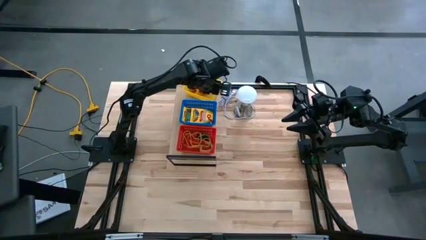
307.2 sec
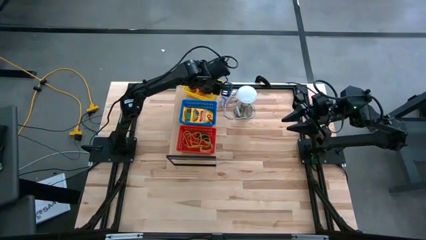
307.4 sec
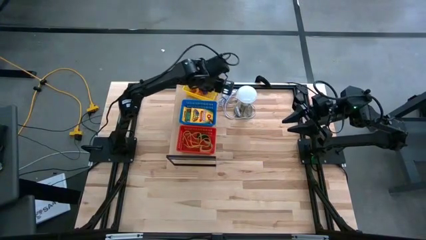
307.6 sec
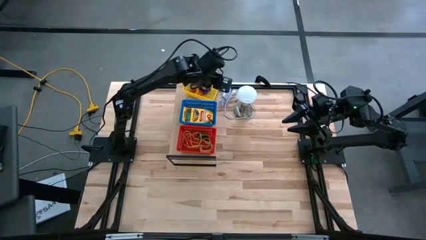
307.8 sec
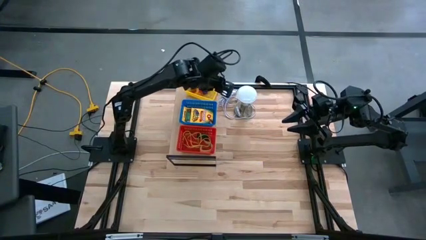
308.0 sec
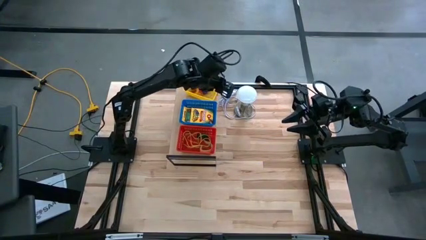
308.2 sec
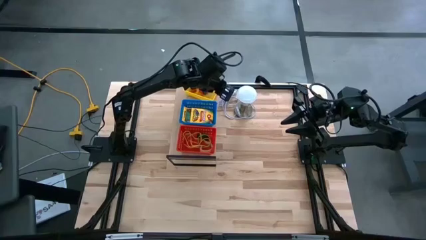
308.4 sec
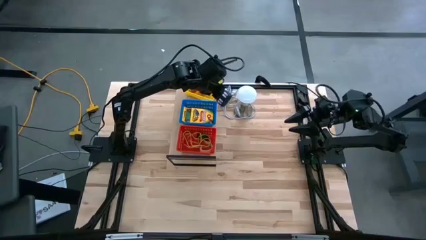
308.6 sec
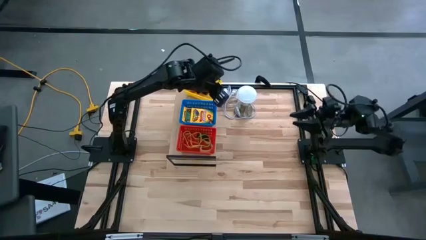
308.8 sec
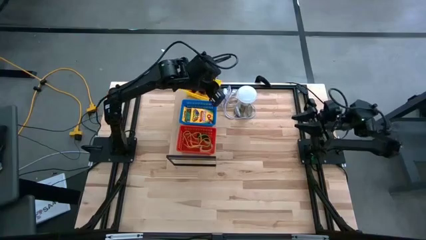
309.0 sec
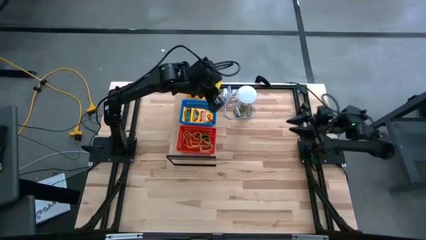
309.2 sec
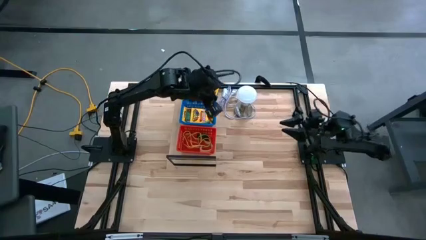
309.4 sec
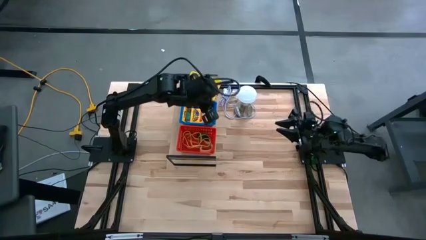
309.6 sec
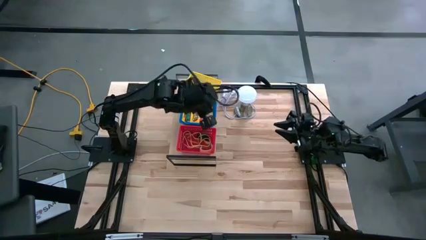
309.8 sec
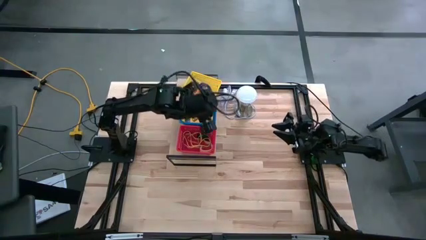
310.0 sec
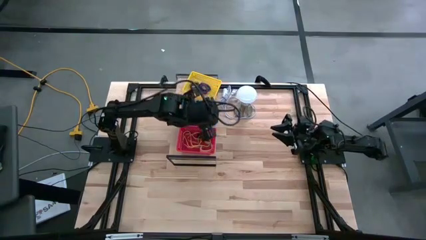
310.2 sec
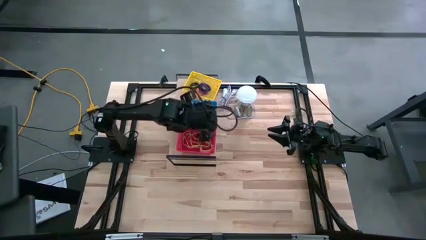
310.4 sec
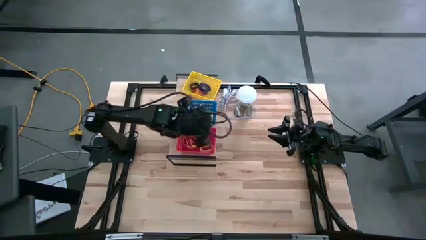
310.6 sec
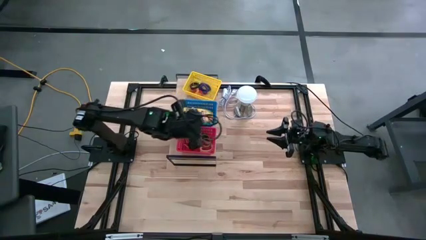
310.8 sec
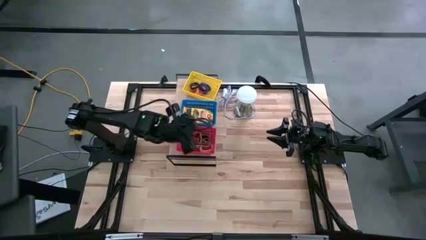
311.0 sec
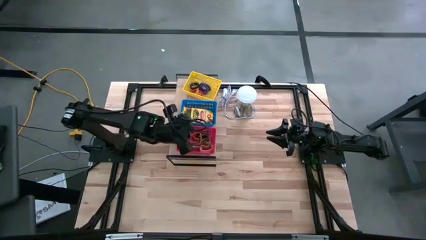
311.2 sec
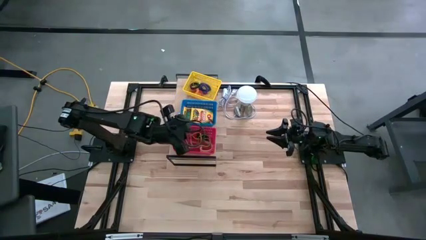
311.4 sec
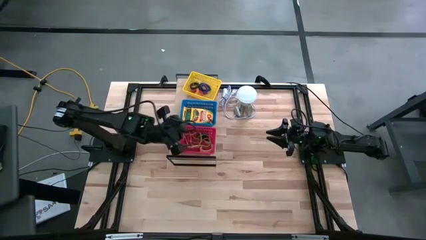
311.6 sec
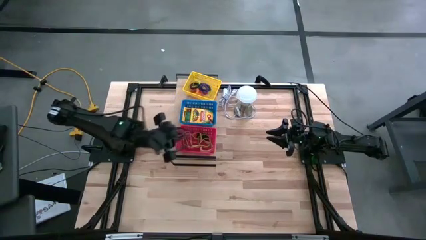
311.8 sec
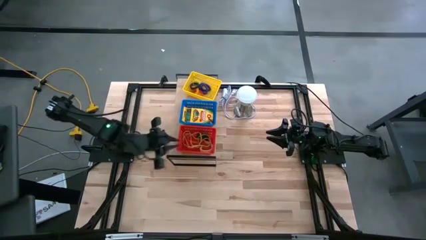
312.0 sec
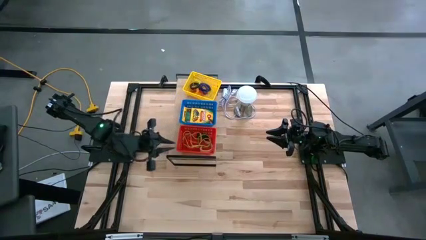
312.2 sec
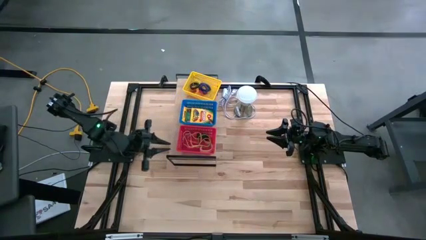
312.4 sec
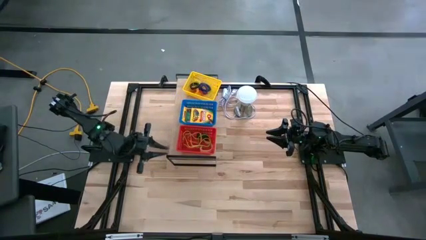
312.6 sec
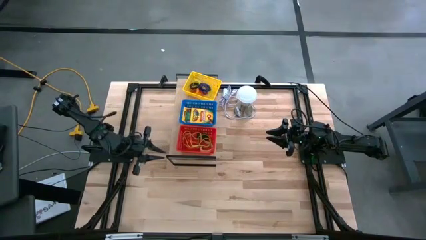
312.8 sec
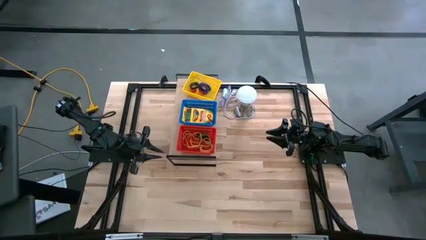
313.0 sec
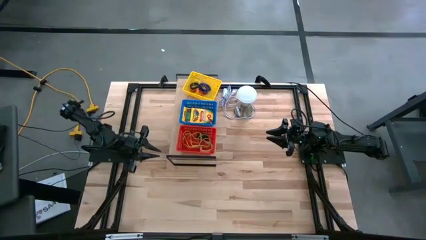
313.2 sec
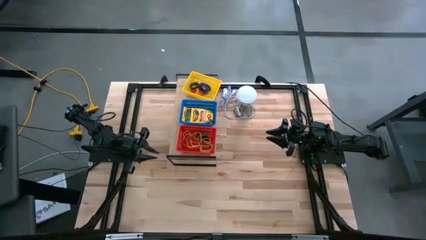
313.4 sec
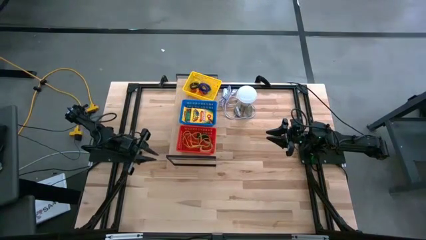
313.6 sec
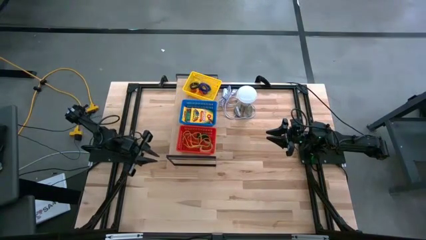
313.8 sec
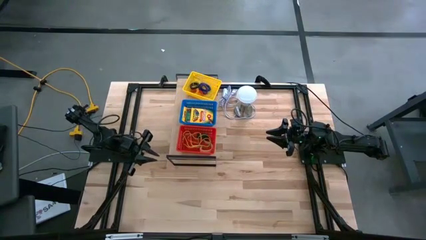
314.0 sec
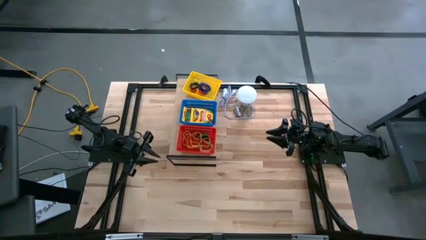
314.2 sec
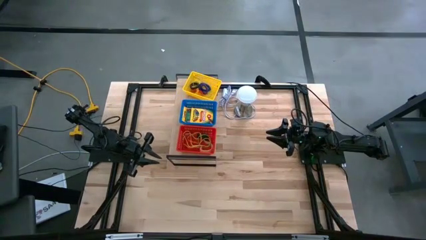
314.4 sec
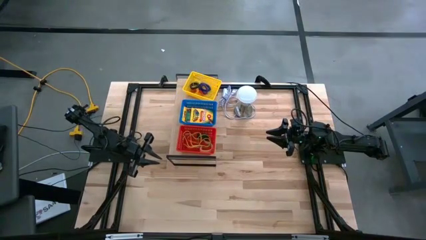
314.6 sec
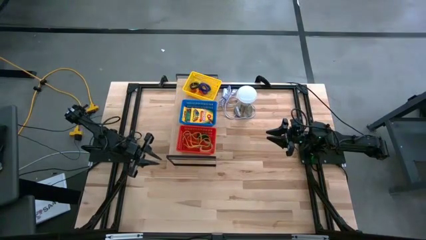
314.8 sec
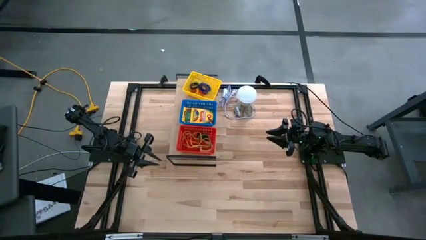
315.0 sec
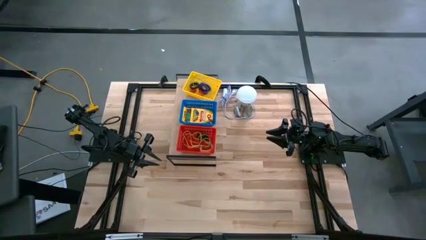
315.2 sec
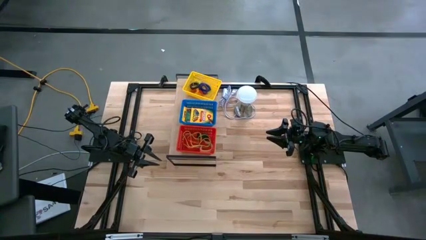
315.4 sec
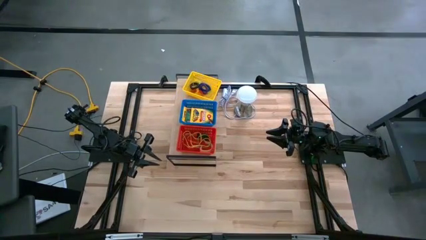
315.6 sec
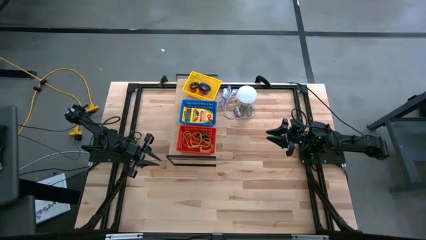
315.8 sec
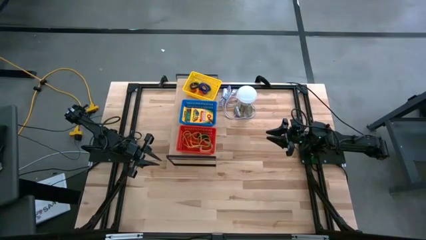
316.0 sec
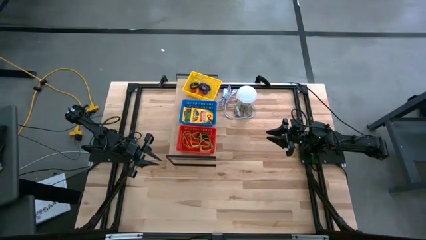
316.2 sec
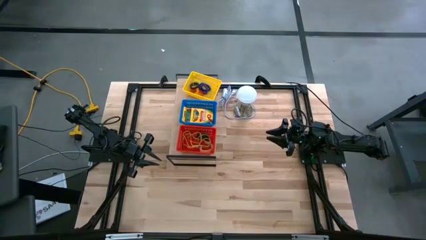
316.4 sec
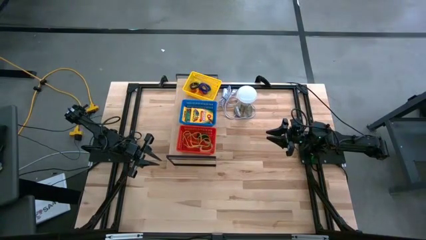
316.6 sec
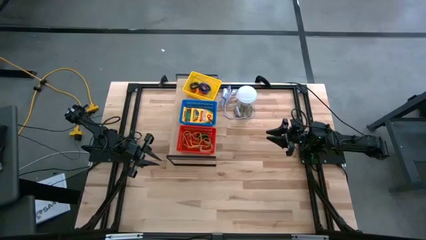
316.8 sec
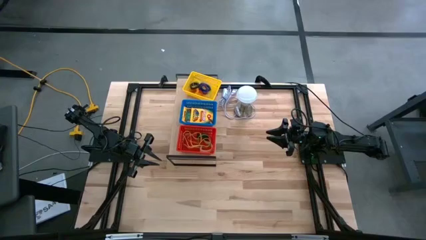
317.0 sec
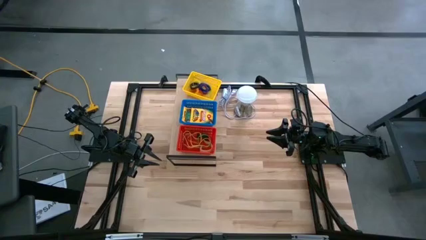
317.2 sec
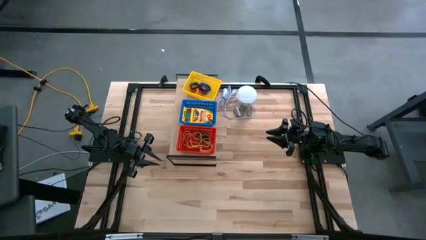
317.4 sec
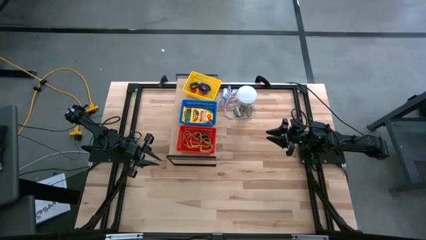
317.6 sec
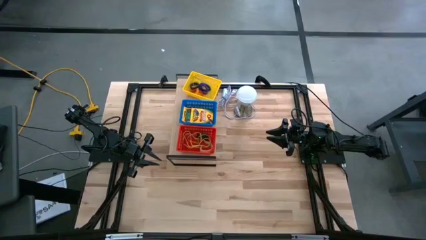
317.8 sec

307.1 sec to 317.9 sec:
Task: Pick & Place Office Desk Supplies
Return to Home Position

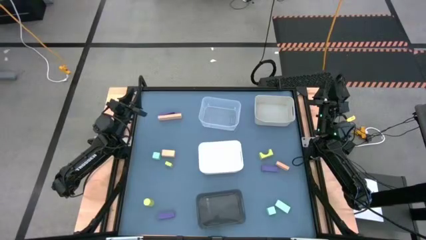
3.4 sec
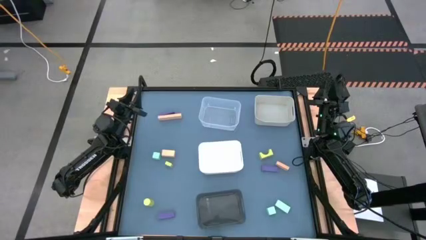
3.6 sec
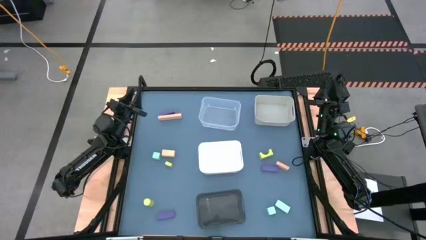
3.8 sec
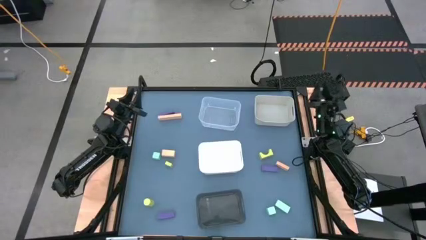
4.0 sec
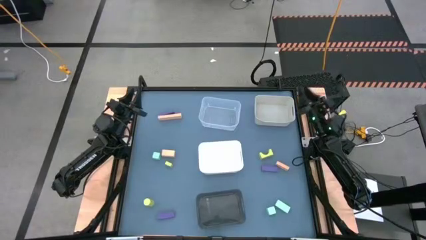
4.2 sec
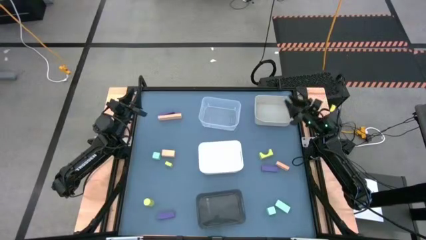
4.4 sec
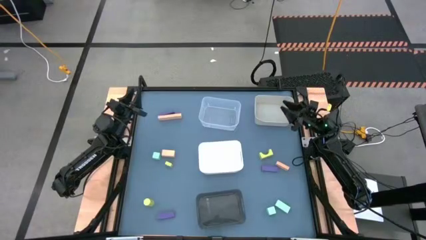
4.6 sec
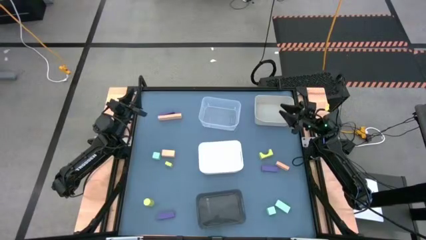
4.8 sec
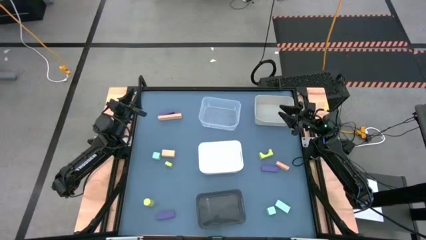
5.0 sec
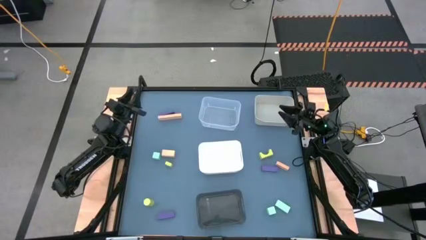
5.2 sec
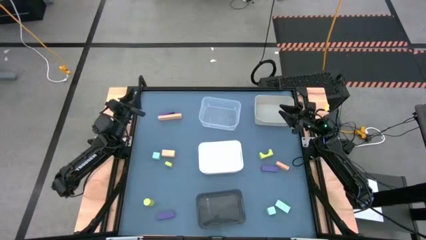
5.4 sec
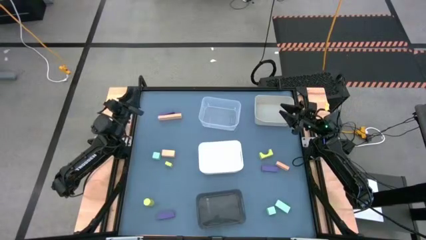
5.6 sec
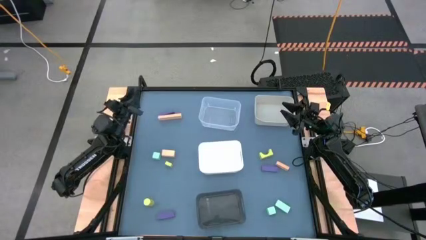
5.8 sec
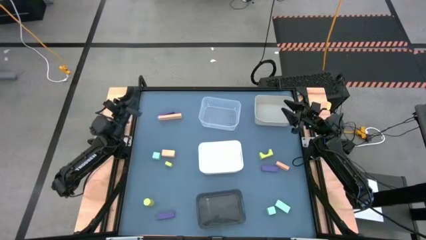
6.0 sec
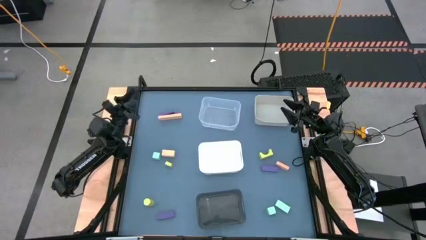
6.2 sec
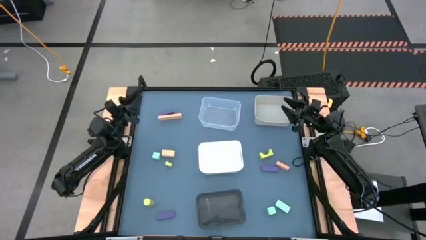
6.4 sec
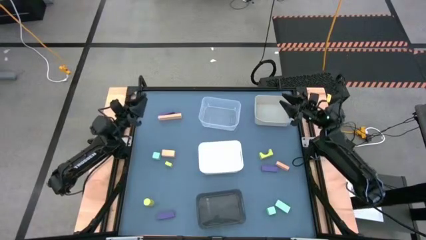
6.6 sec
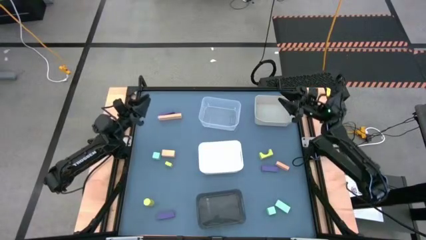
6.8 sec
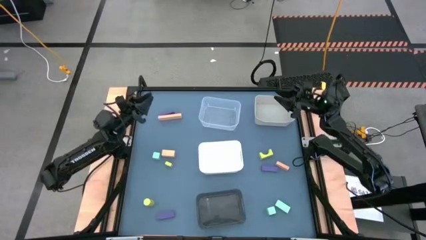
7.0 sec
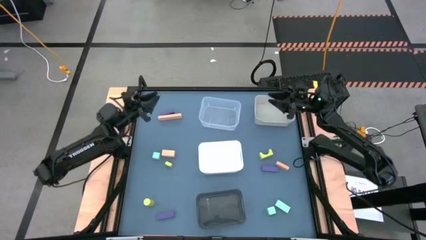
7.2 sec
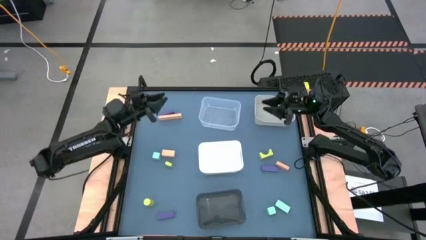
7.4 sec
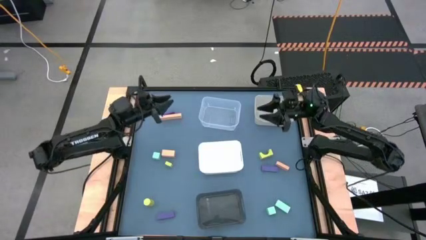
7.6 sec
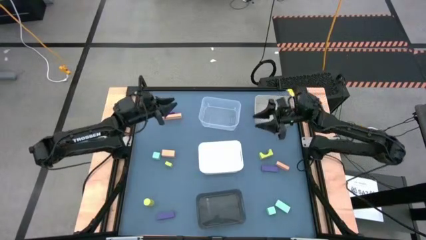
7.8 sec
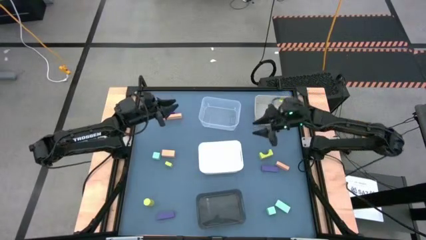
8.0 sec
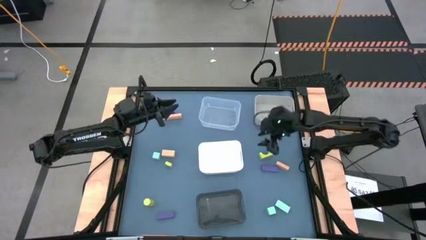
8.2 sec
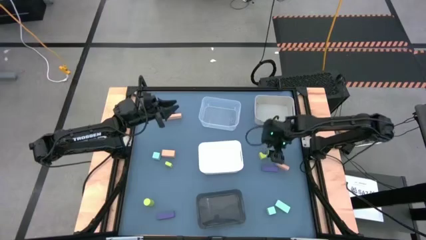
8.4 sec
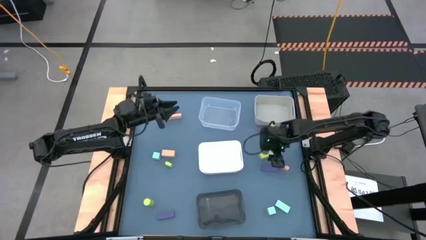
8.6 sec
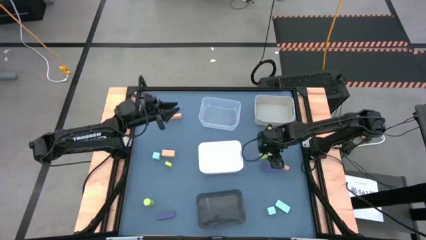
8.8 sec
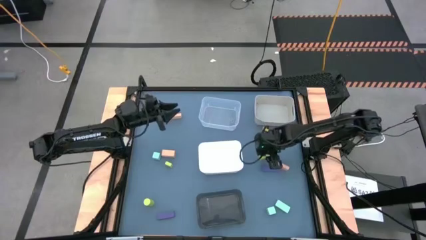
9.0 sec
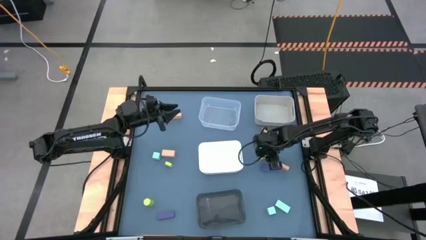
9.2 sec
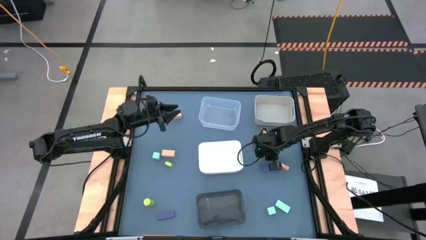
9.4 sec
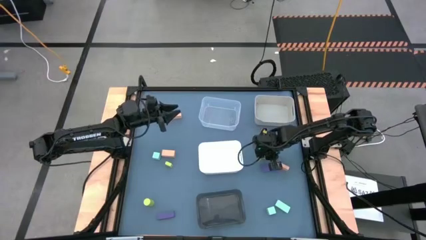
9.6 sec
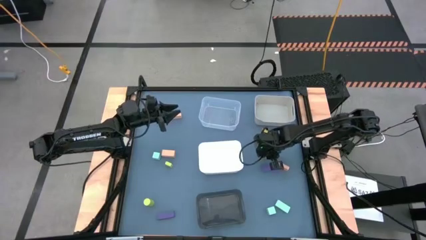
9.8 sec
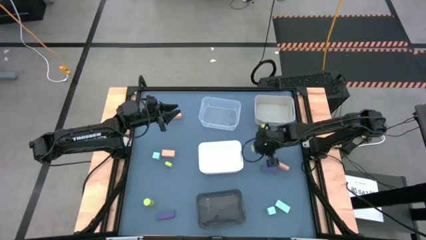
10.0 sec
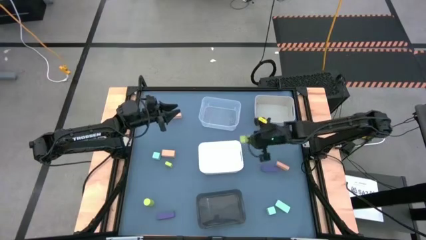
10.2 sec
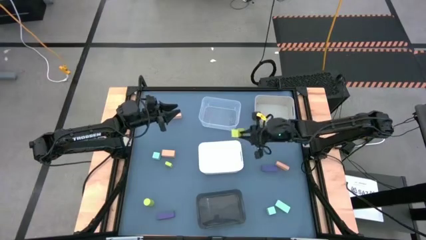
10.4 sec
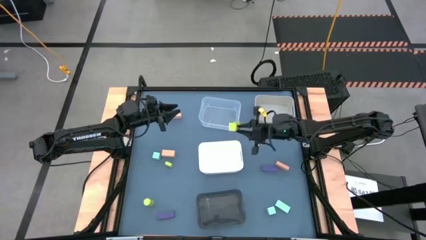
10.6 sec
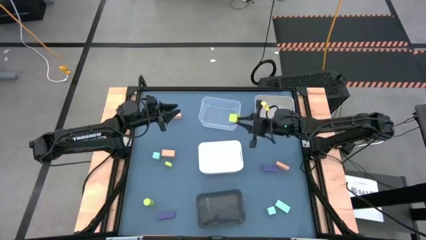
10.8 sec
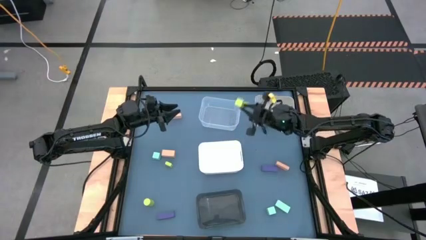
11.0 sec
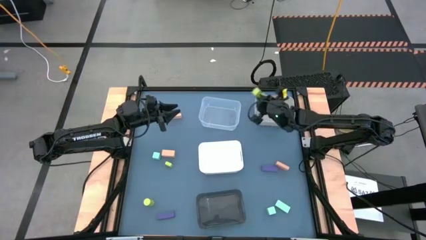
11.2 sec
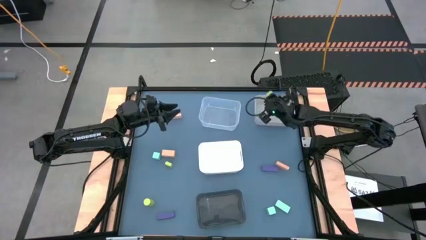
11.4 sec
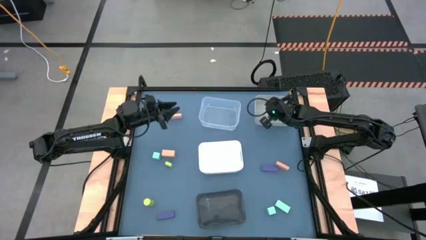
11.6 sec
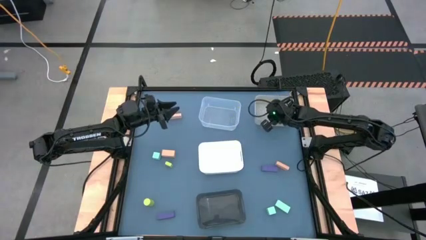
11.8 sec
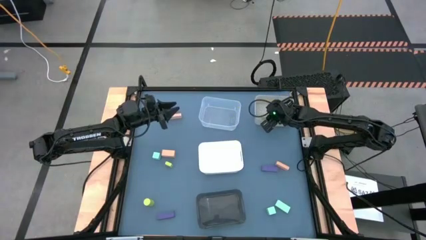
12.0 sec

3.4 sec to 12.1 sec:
Task: Sort & place blocks by color
Put the yellow-green bridge block into the grey bin
